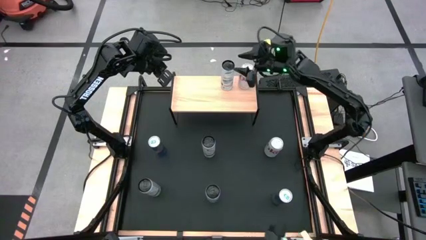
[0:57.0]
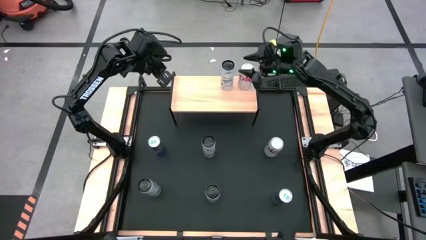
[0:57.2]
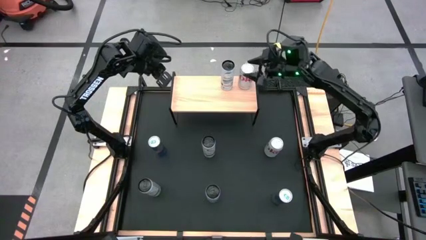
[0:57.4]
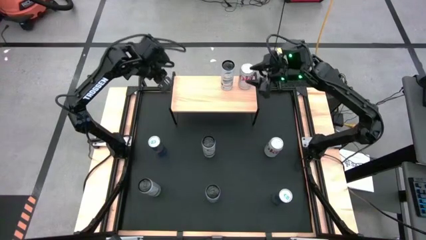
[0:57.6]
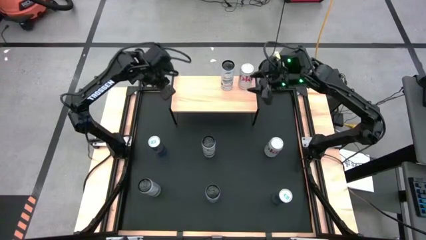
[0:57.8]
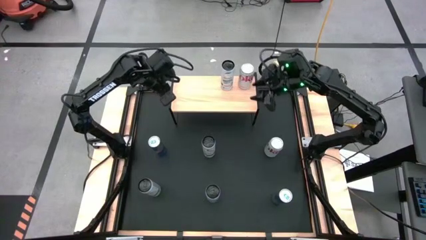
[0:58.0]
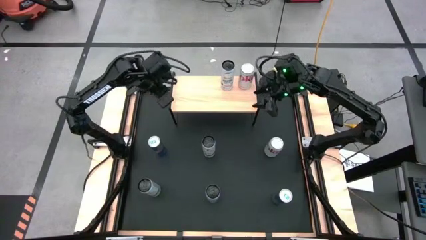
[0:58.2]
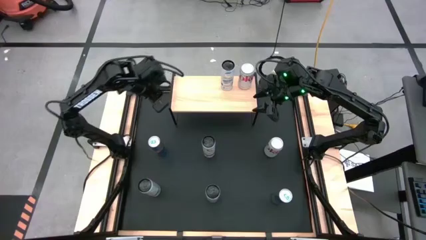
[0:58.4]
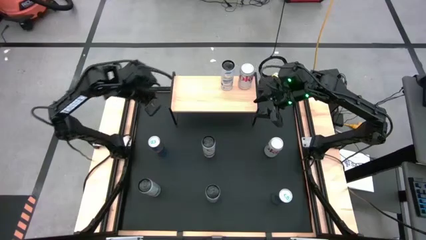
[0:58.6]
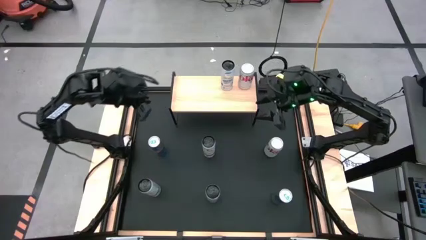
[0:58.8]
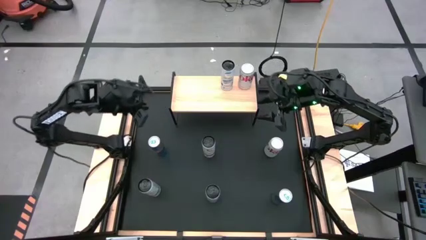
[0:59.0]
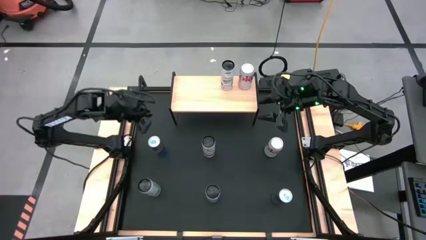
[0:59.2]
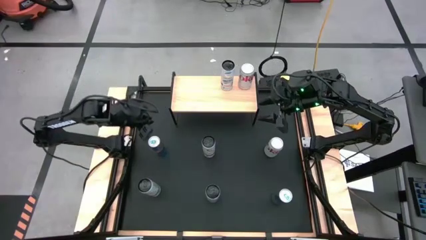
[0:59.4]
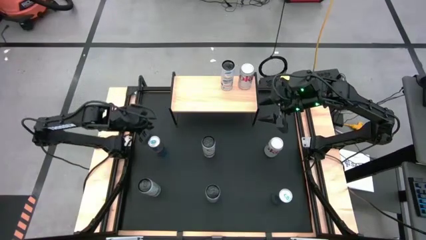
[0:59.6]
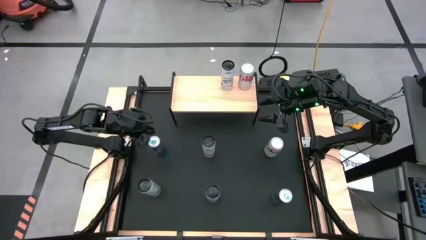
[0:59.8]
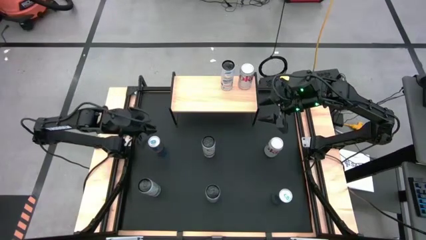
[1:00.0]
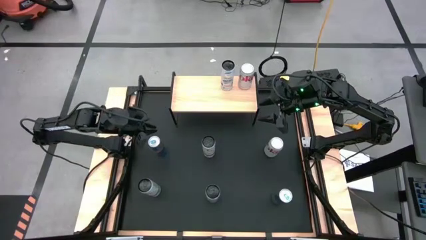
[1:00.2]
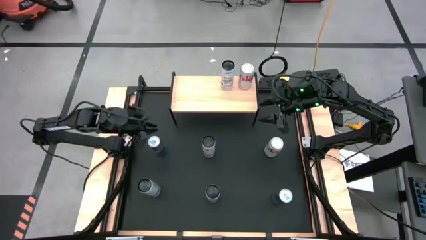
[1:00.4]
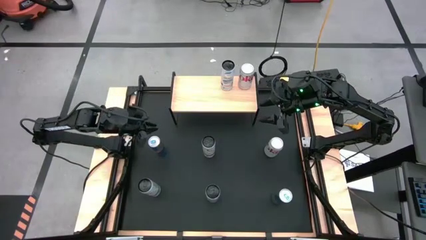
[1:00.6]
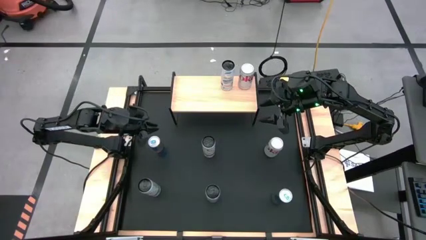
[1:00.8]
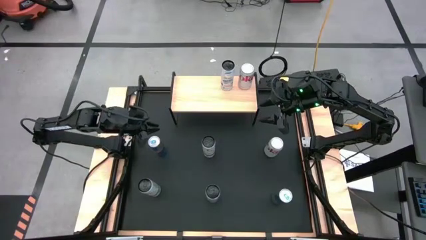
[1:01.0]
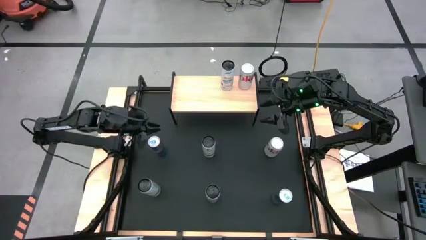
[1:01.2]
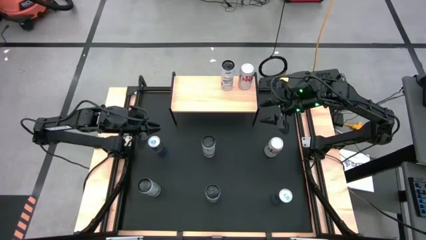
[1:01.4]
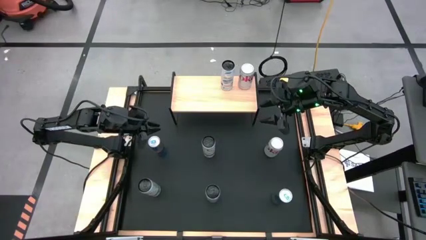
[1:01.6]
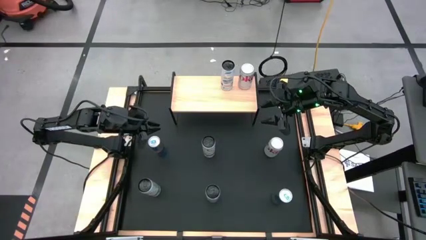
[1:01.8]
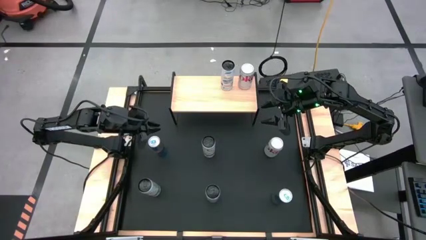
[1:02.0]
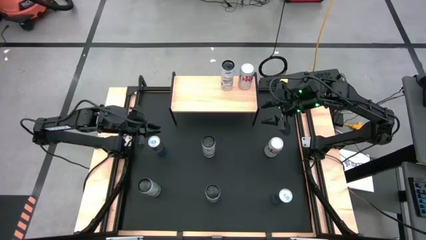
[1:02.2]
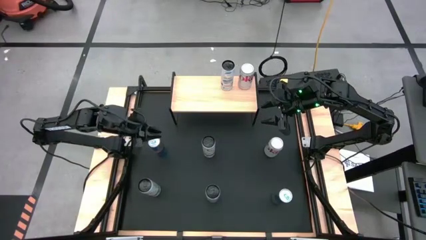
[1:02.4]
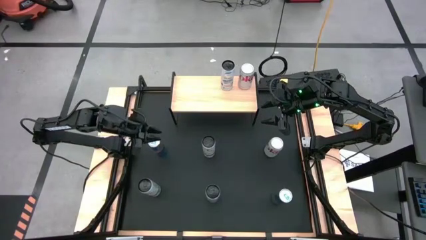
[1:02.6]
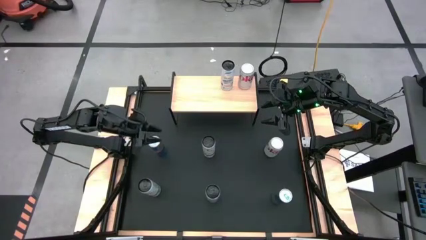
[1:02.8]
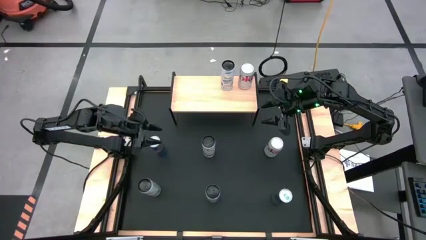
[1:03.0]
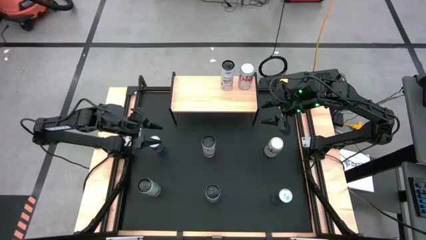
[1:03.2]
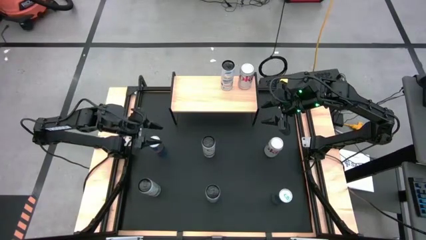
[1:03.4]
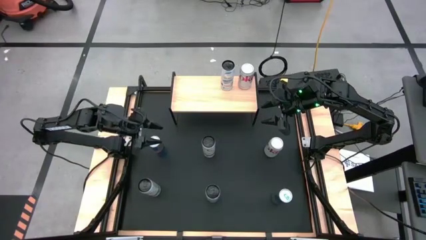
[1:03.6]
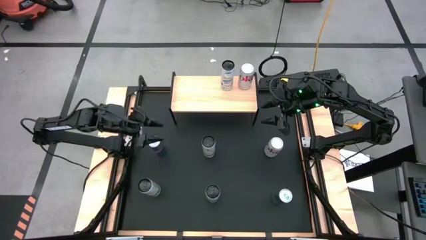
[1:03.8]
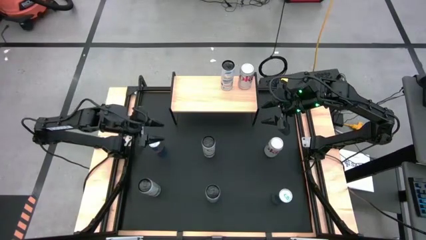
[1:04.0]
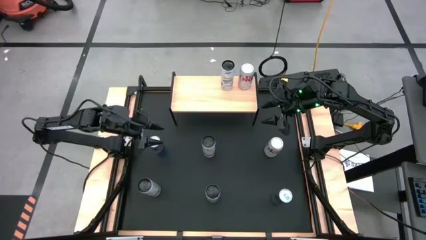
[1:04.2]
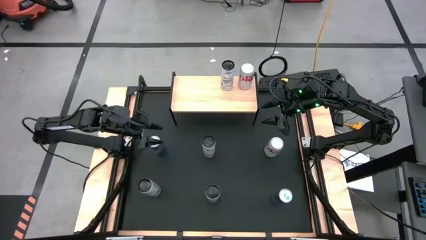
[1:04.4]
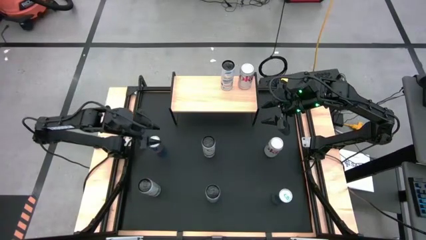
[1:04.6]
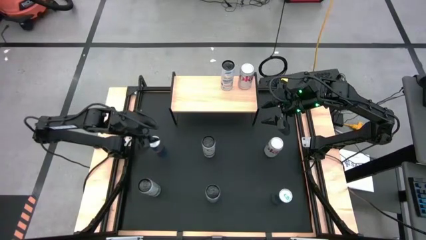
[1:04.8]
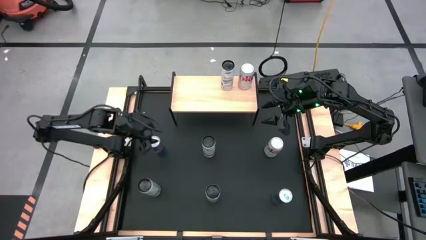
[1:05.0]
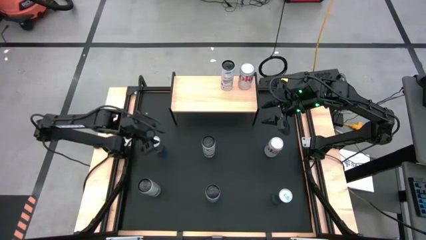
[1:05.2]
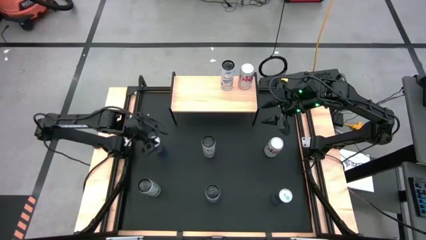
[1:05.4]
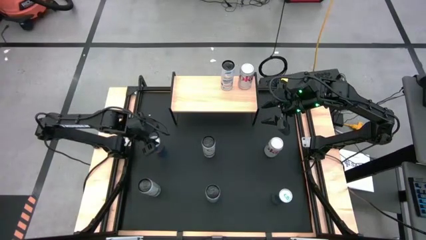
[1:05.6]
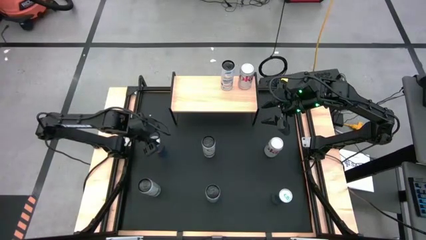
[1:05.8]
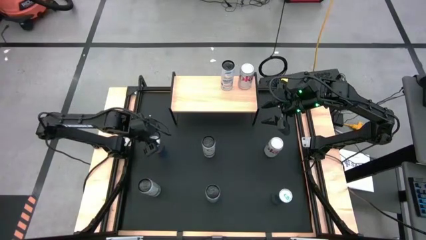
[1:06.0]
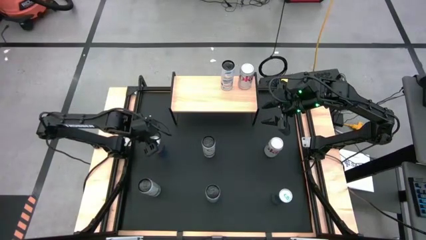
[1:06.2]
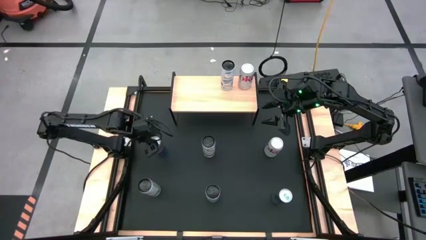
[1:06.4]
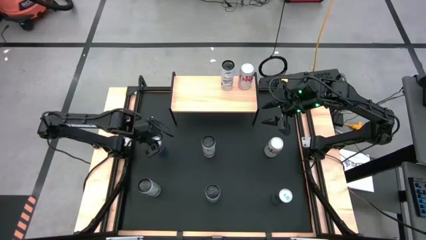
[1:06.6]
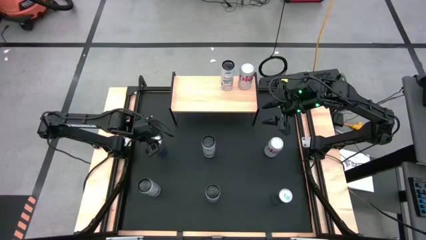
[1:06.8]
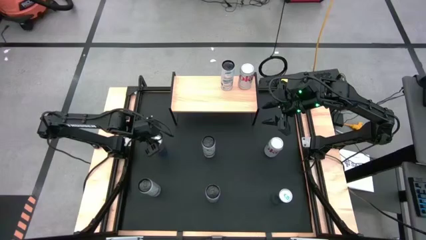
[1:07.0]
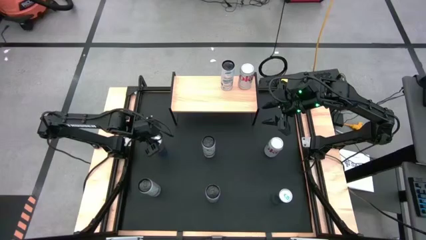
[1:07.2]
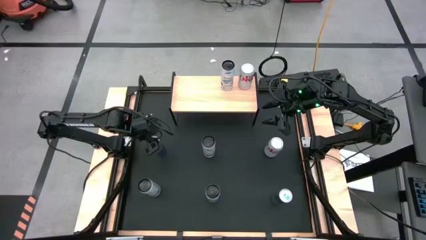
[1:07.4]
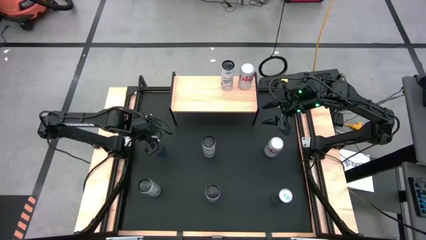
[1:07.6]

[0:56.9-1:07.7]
Task: Place canned beverage on shelf
Put the top left blue soda can on the shelf

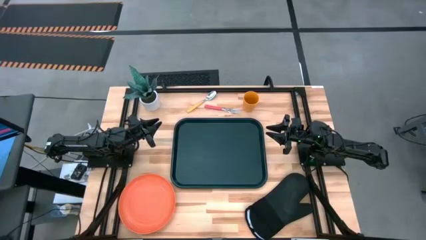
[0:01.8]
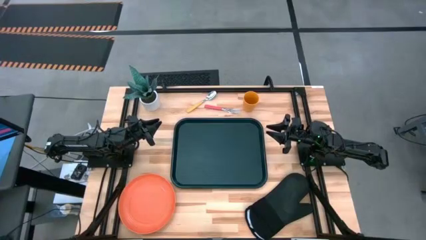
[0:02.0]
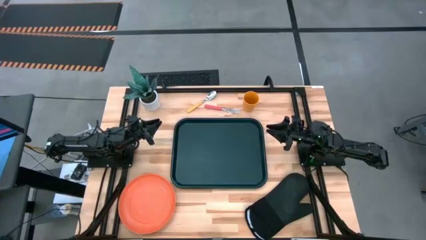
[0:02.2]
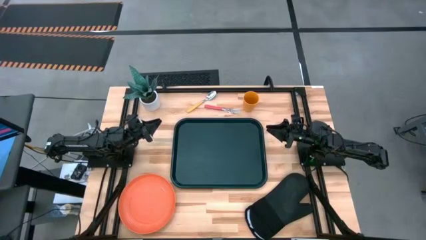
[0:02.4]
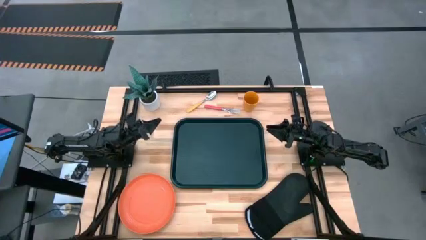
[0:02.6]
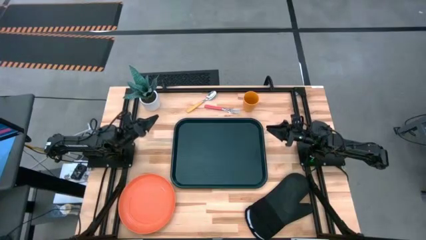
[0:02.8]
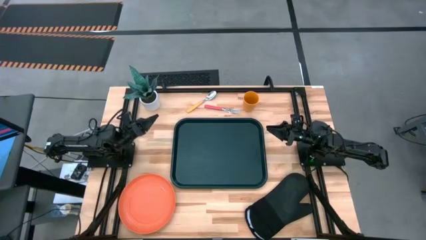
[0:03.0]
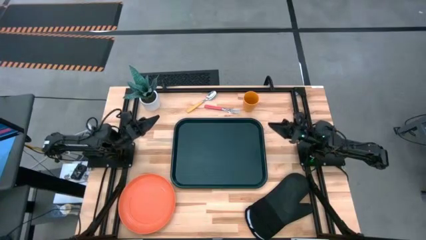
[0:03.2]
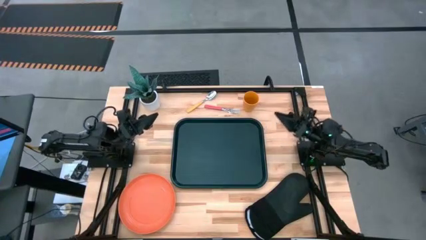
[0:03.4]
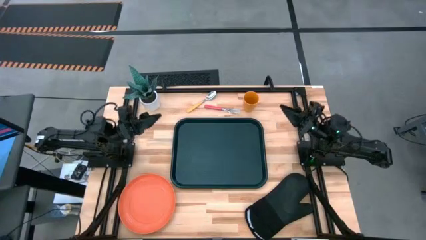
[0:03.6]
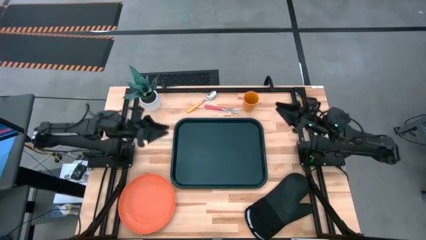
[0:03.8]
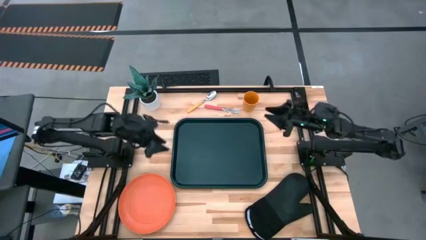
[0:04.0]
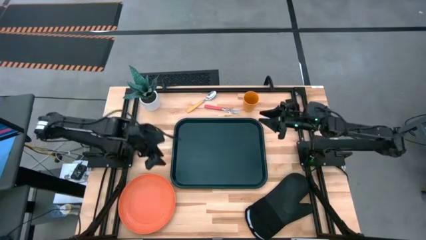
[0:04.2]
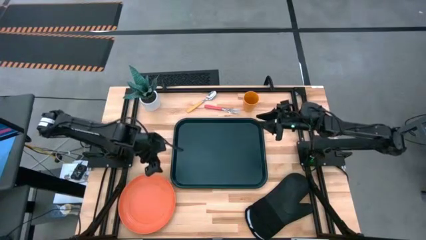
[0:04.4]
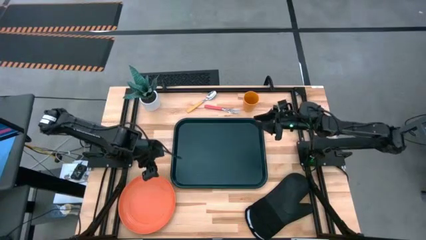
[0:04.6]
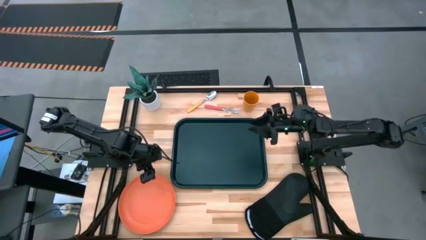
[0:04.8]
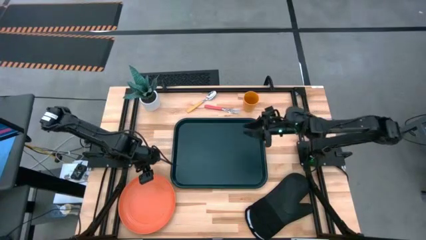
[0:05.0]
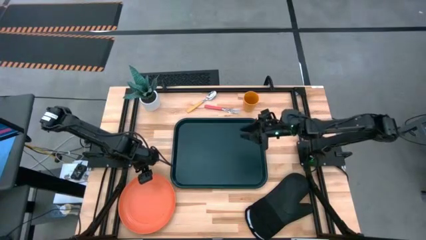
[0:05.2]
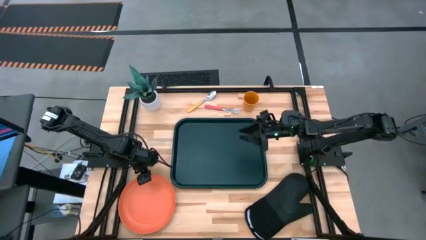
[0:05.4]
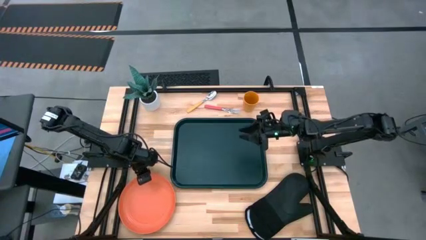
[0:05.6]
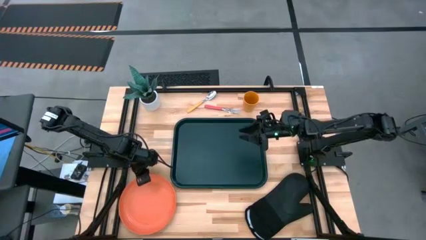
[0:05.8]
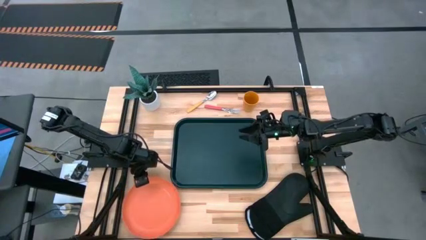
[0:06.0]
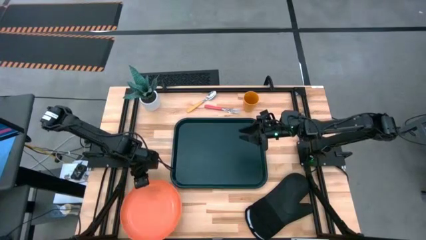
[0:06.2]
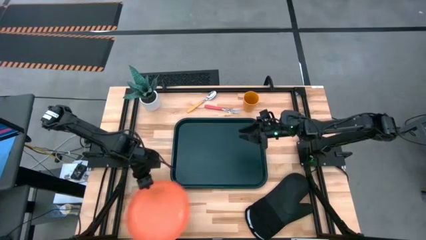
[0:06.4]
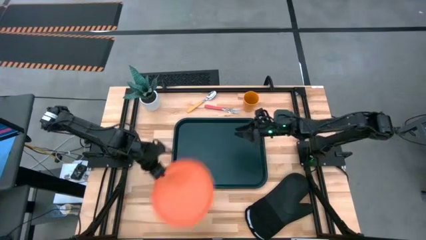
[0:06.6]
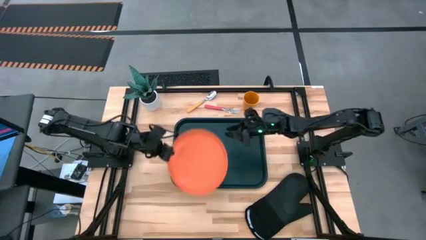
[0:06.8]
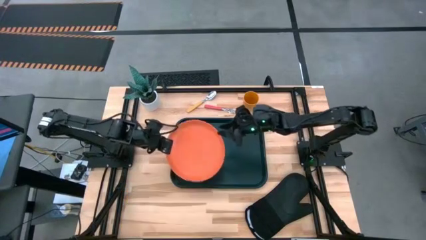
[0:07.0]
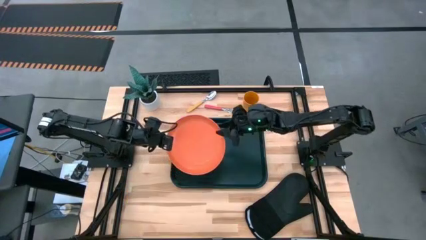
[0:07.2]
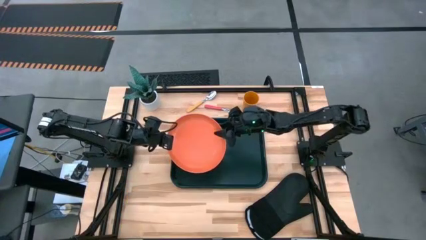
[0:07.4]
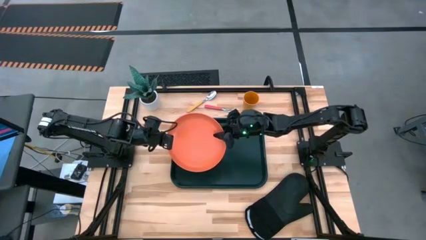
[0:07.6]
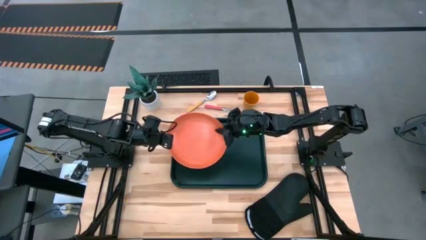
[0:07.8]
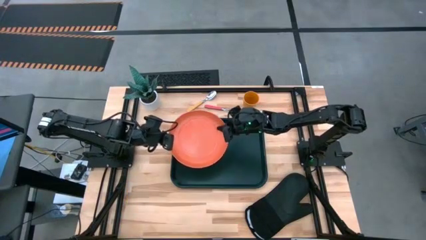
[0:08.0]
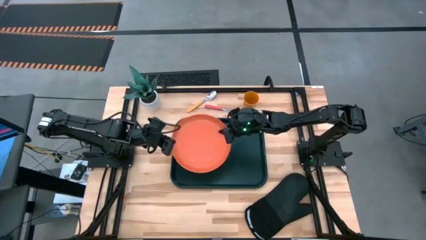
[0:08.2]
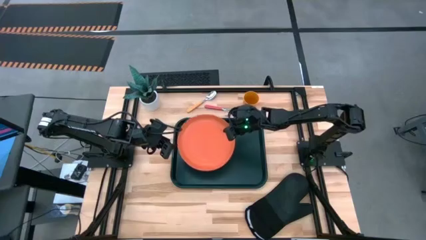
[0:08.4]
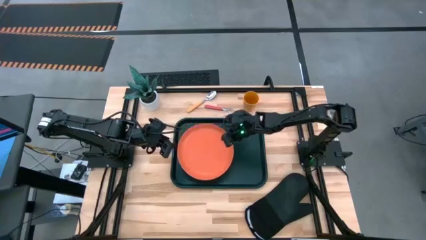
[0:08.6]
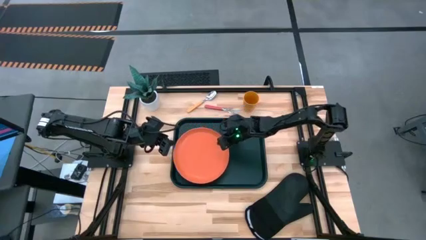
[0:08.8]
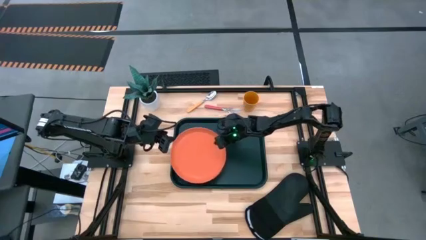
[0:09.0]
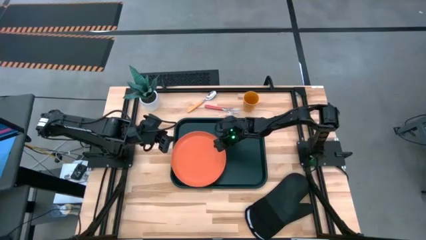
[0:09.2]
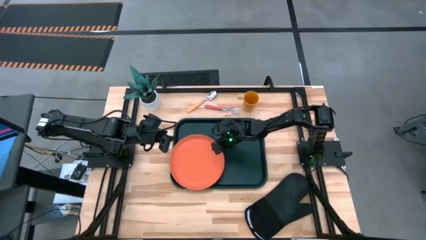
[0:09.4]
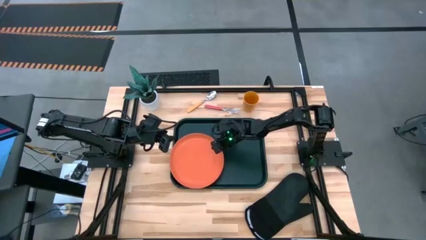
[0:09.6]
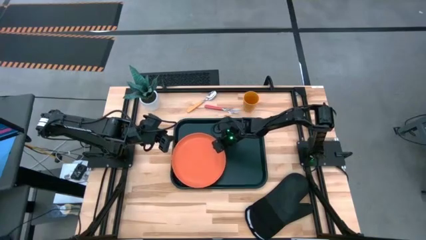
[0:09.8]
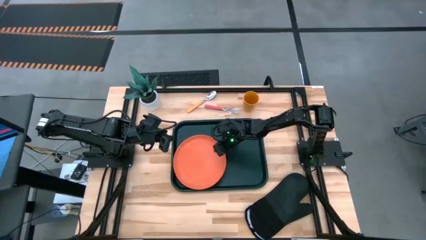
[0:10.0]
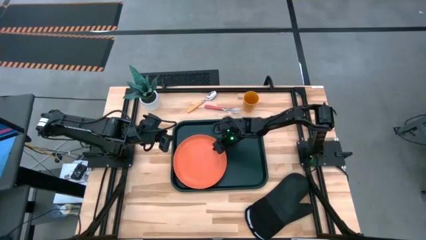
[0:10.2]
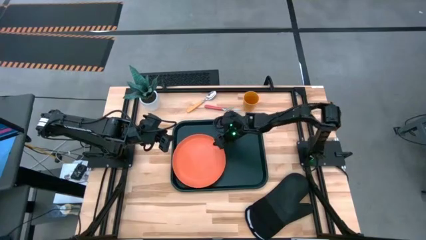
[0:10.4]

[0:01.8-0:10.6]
Task: Pick and place plate/cup/fork/spoon on tray
Put the orange plate on the bottom left of the black tray
